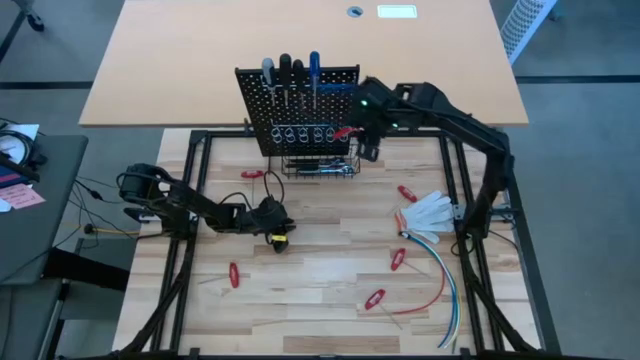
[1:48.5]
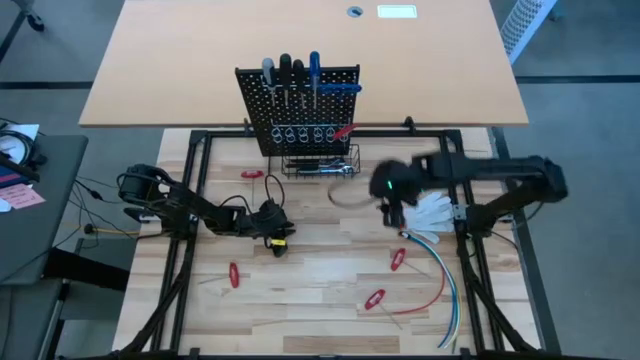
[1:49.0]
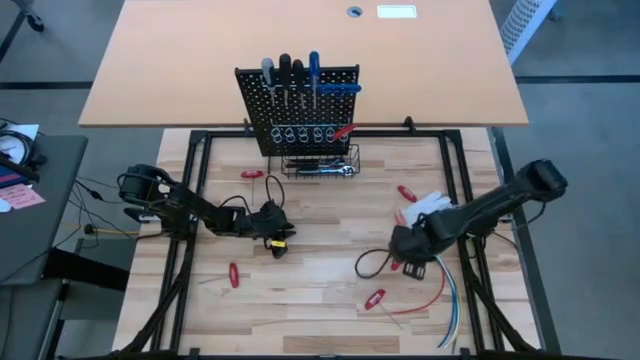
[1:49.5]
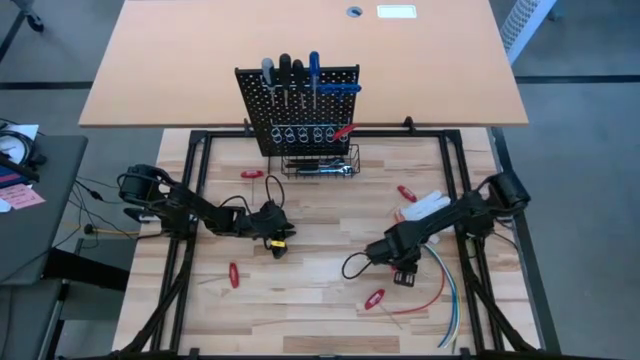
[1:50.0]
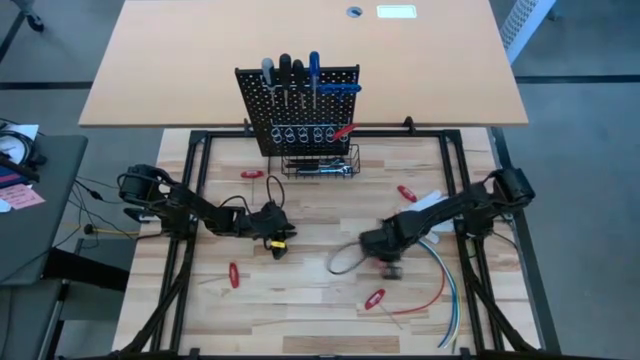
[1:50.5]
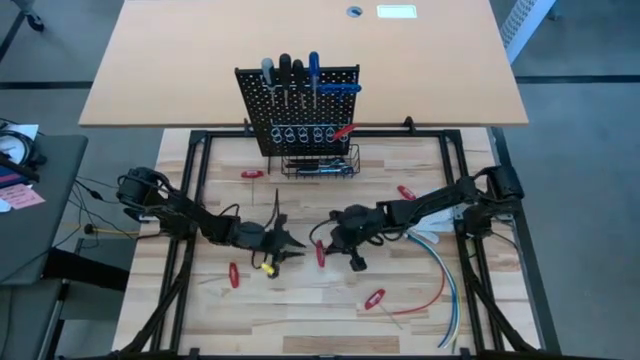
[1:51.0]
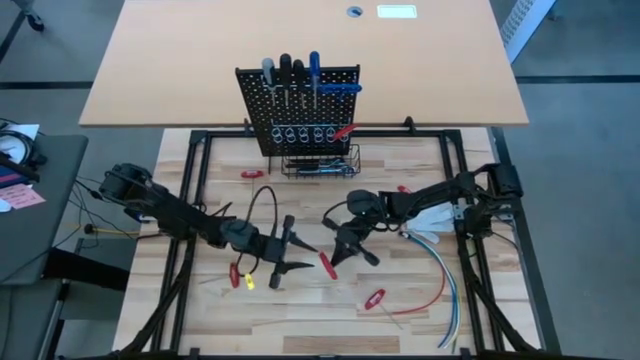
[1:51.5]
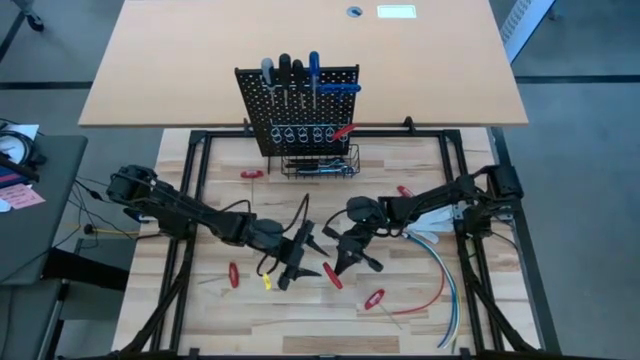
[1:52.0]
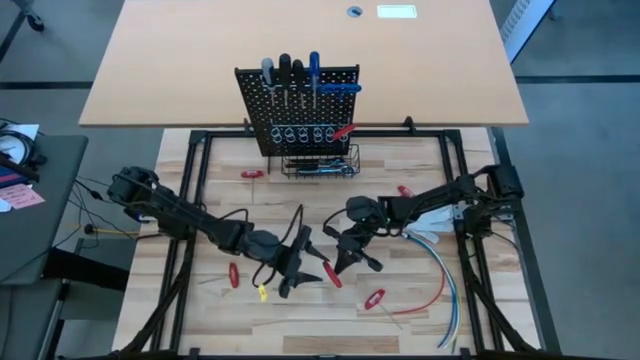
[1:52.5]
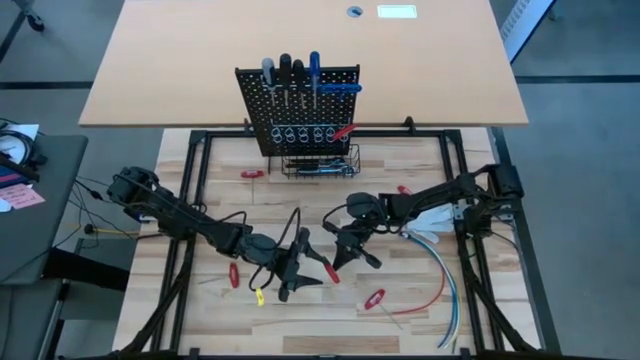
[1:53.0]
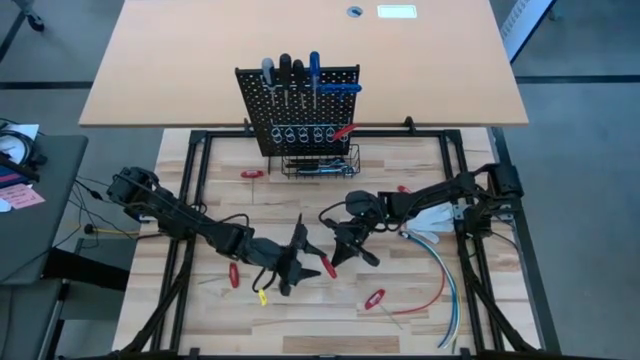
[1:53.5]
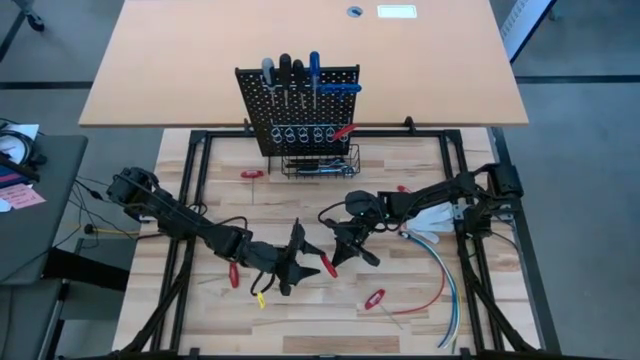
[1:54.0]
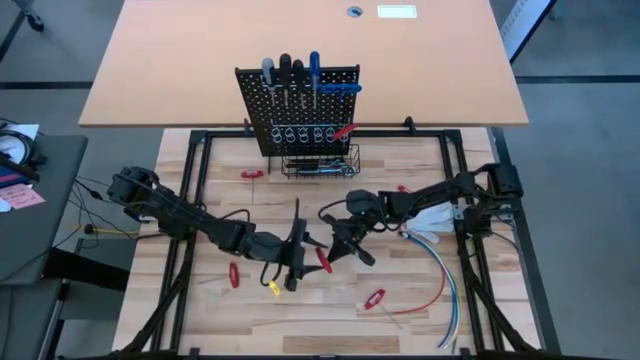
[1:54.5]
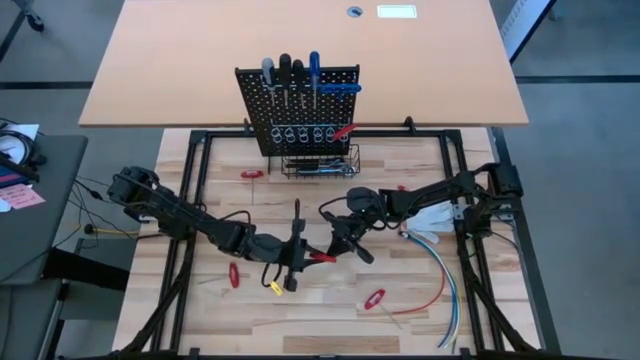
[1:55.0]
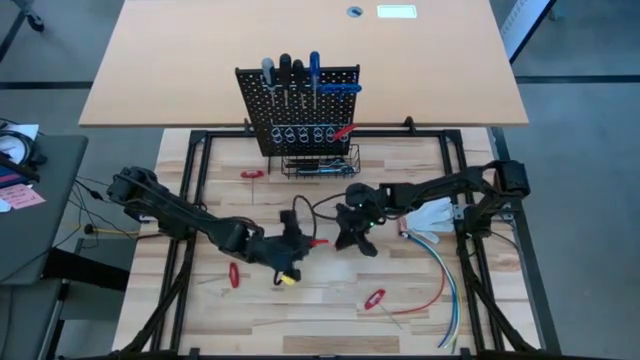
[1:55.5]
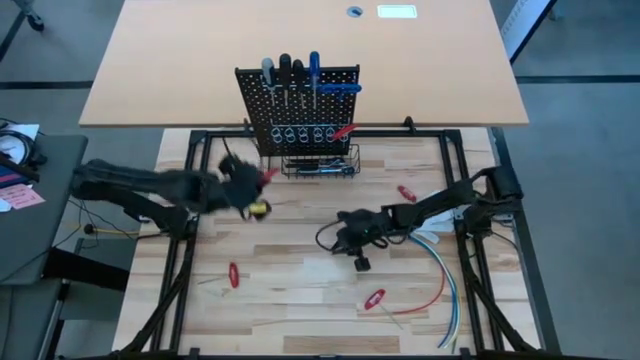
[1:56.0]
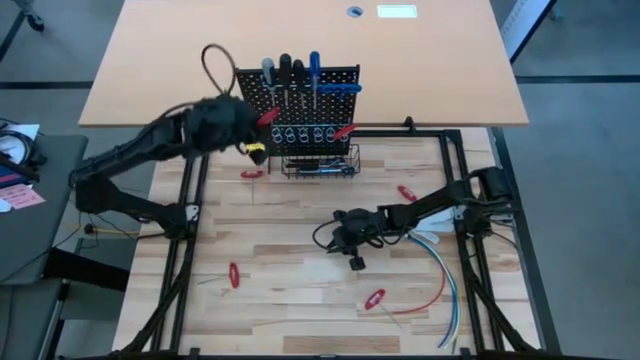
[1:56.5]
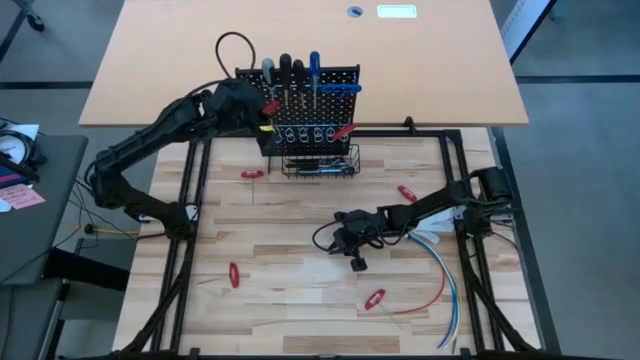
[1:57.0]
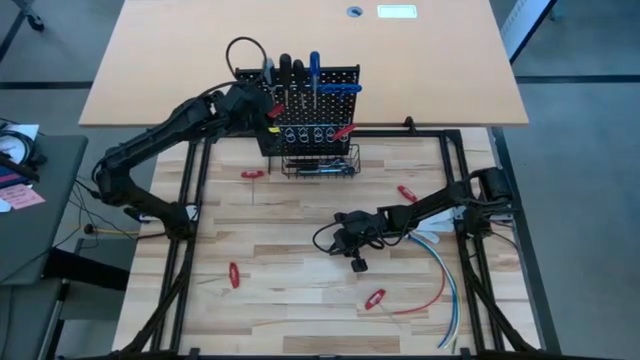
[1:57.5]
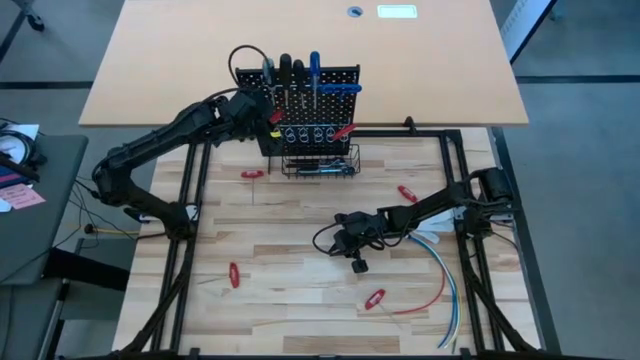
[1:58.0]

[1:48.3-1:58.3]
Task: Hang tools onto peg board
Hang the red allen wrench on the pegboard

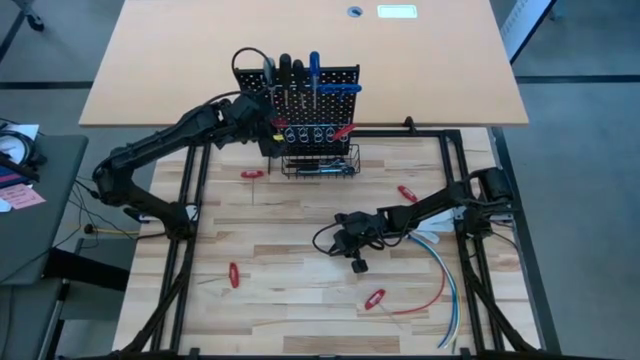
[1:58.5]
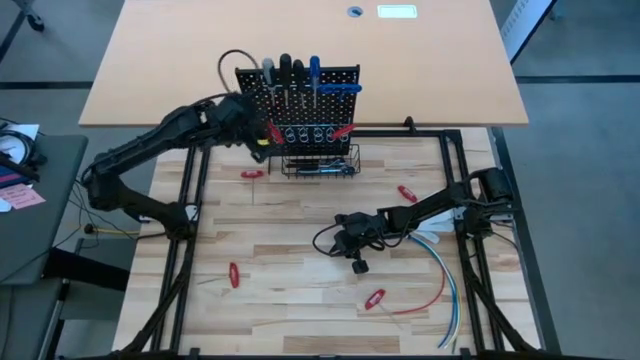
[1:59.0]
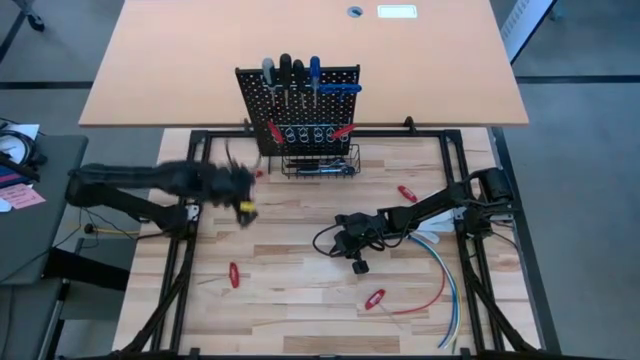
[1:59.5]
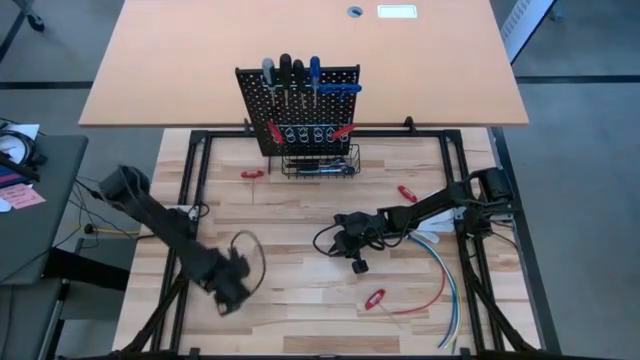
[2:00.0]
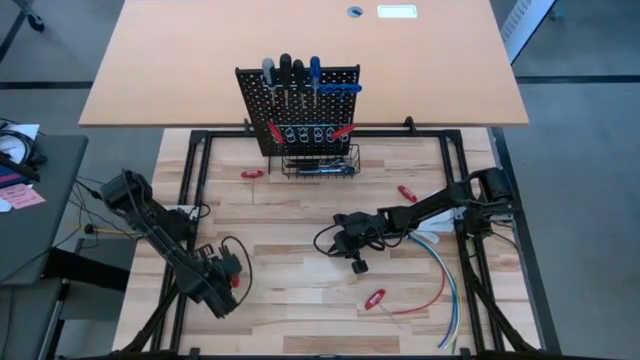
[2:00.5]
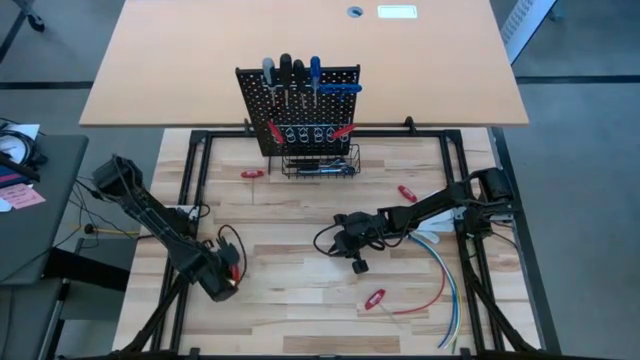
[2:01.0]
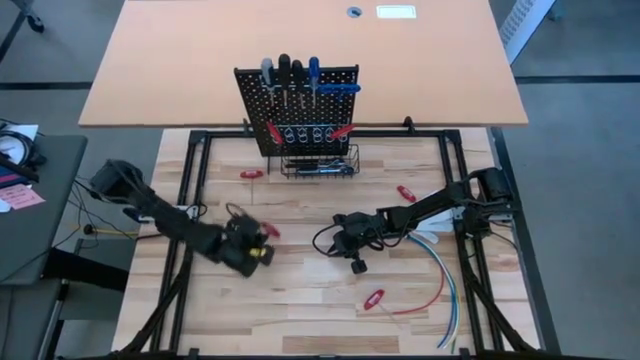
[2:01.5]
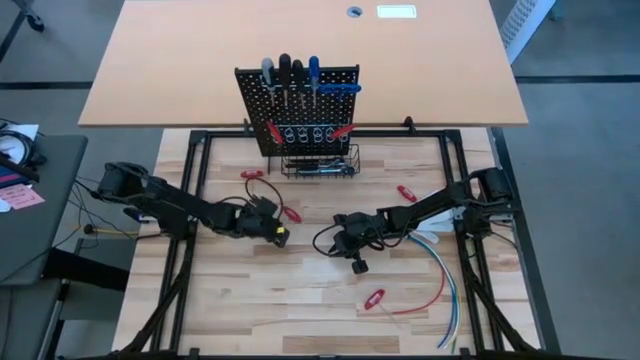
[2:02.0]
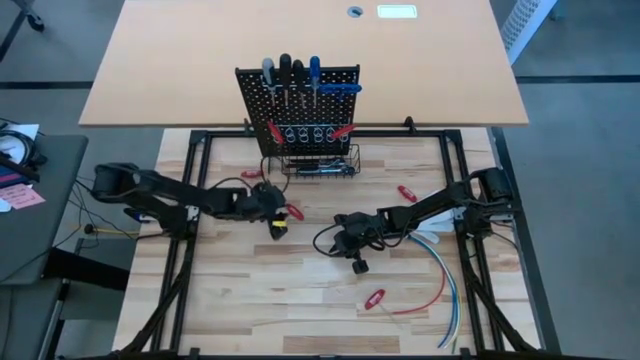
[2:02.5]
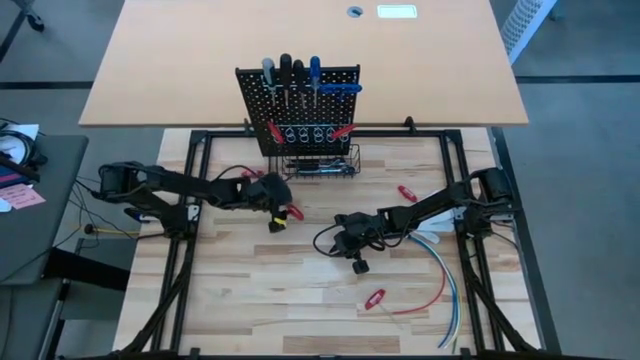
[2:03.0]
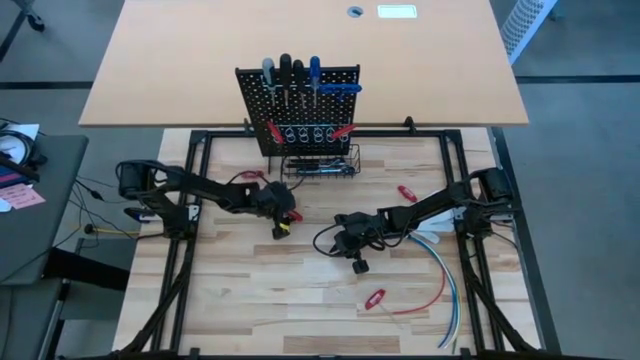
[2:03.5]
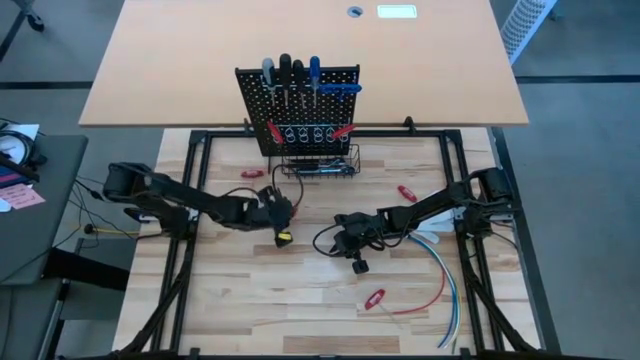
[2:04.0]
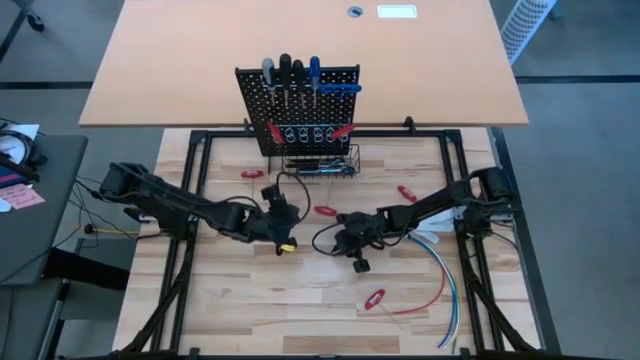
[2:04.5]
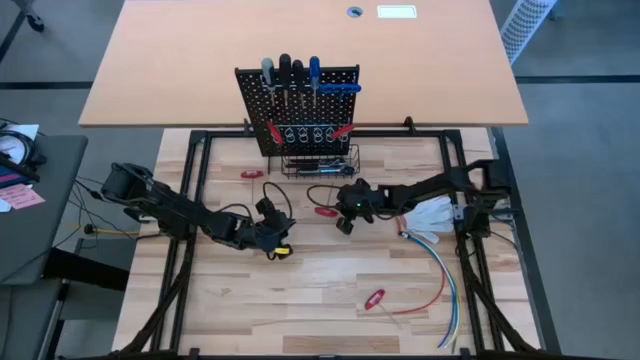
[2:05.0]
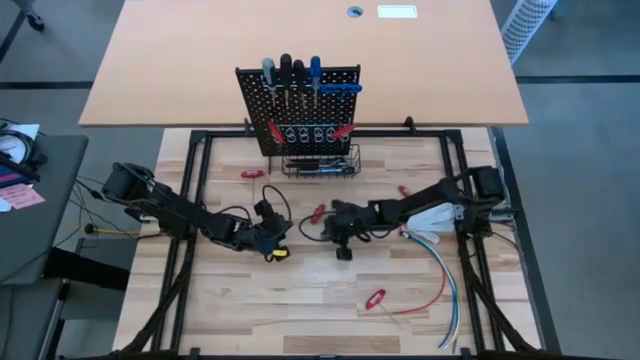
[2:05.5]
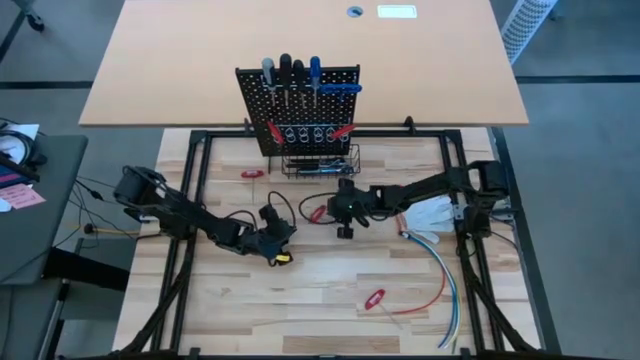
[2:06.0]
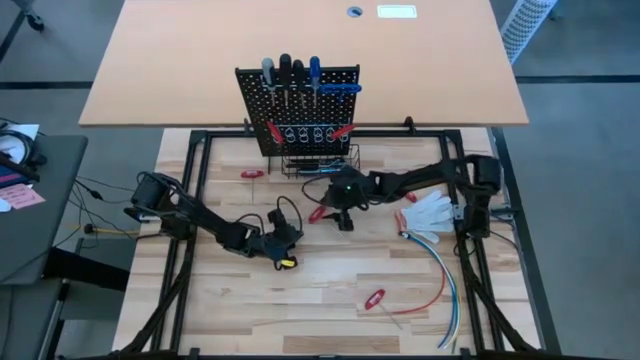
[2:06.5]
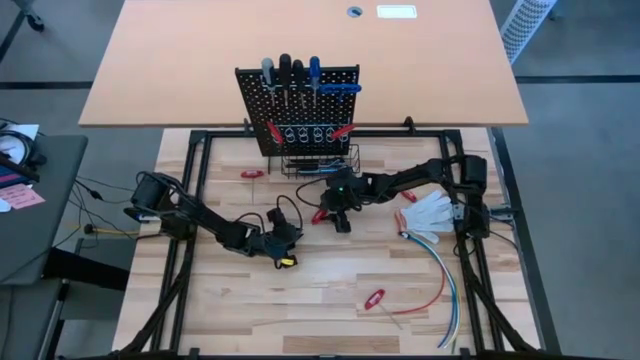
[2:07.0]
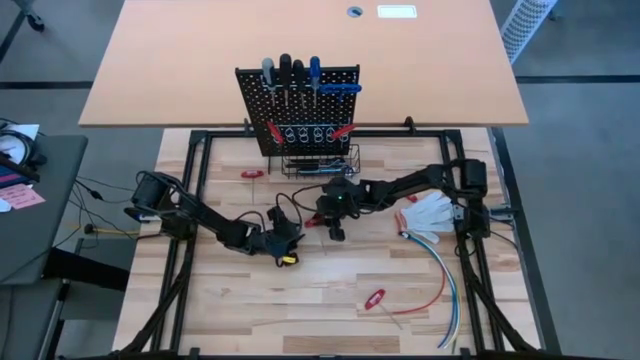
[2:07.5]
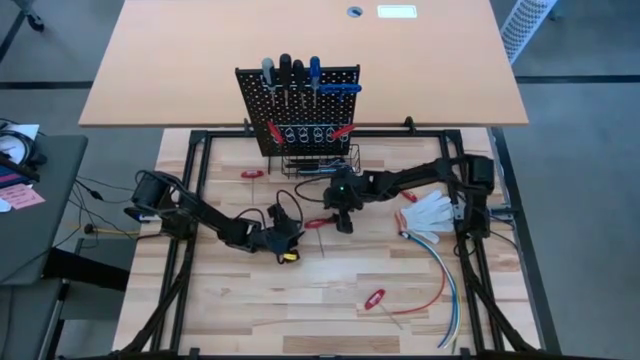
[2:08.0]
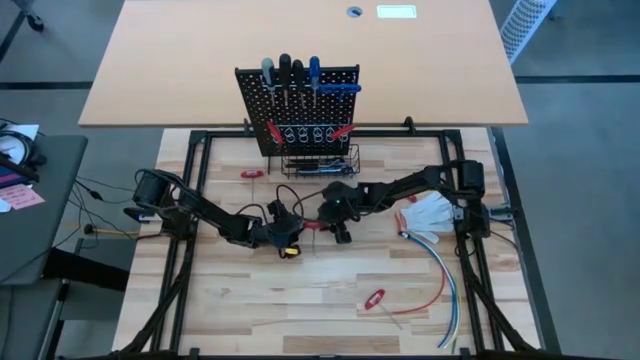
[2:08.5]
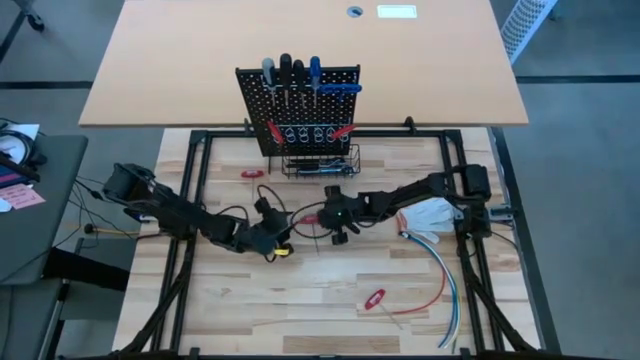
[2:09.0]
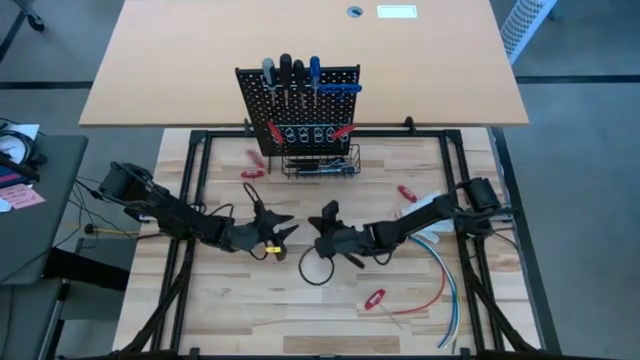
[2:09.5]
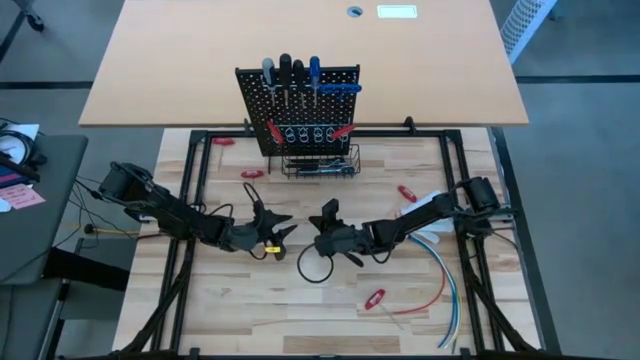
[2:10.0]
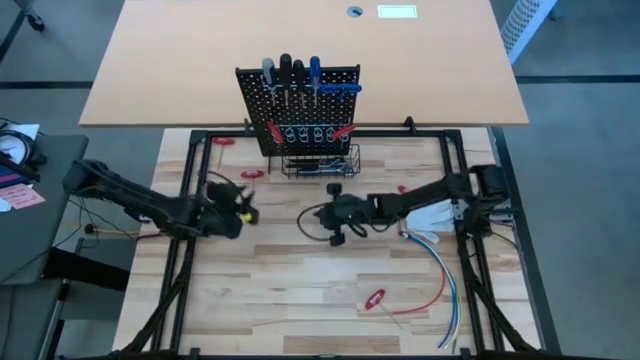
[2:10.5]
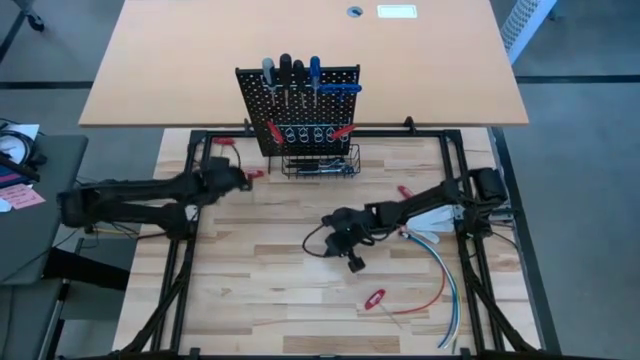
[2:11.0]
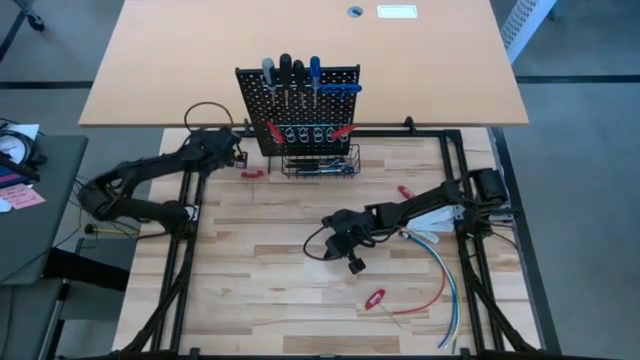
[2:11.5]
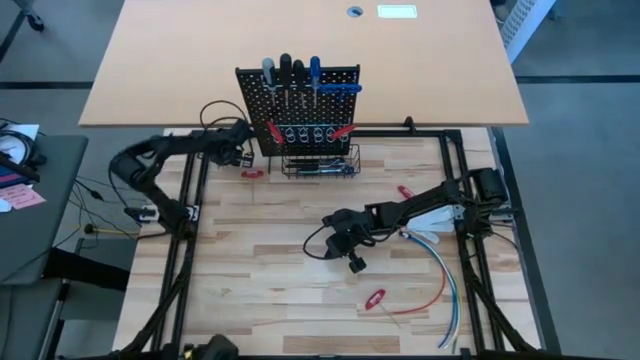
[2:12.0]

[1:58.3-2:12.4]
Hang the red allen wrench on the pegboard
